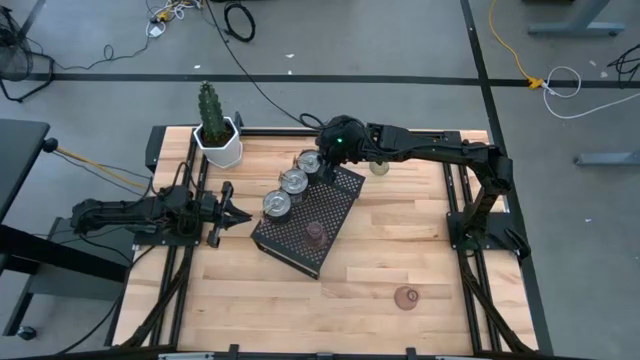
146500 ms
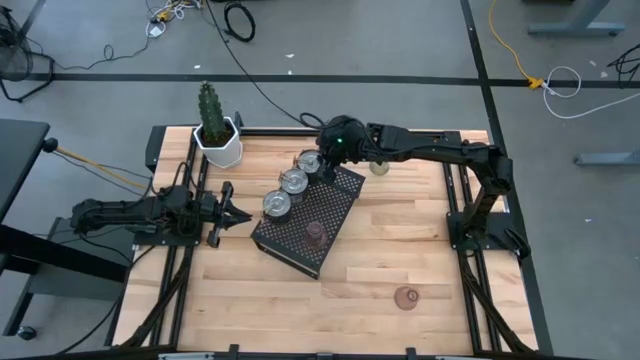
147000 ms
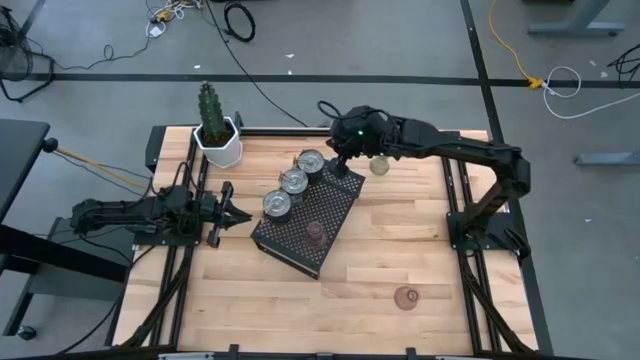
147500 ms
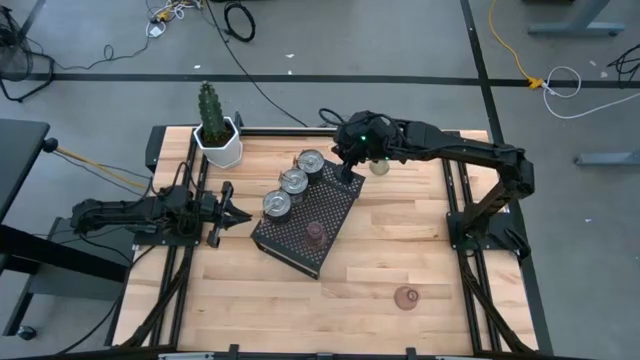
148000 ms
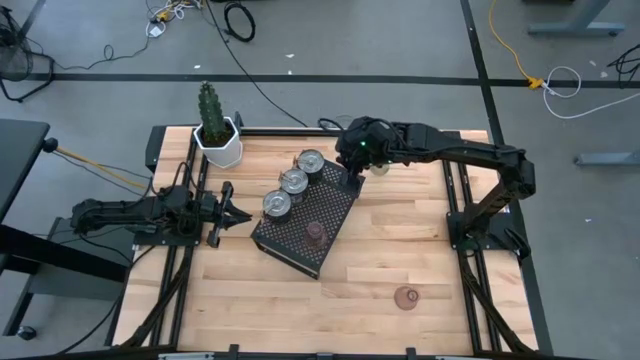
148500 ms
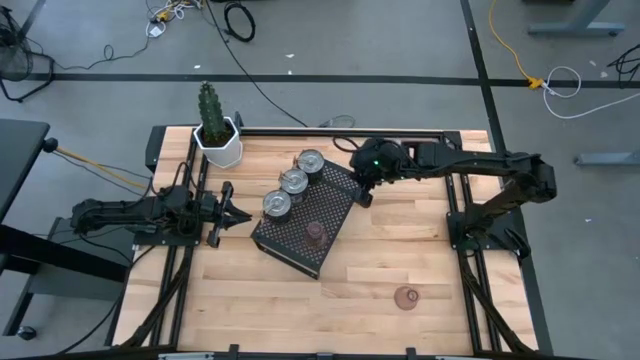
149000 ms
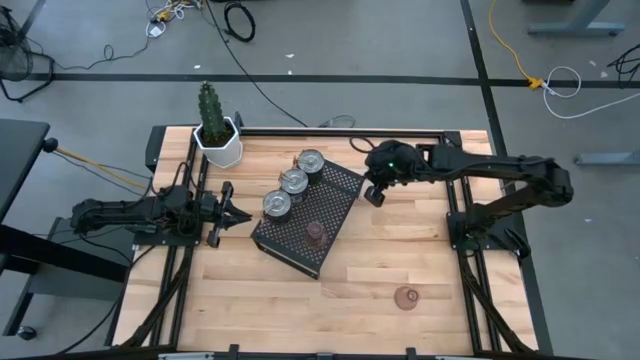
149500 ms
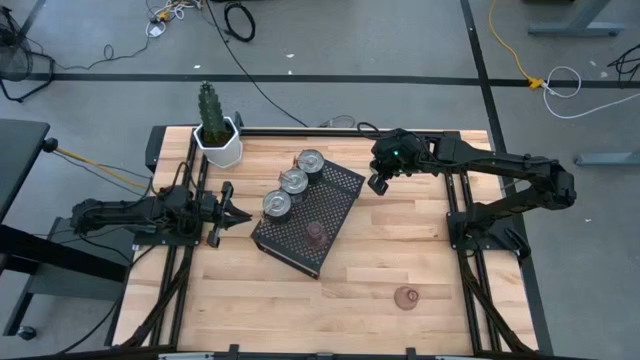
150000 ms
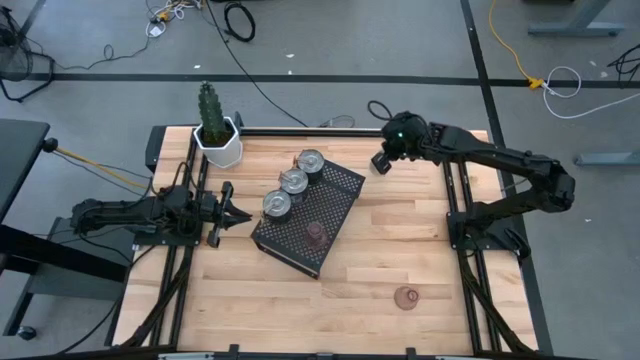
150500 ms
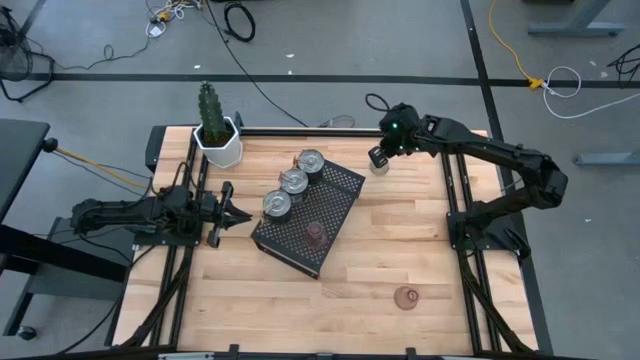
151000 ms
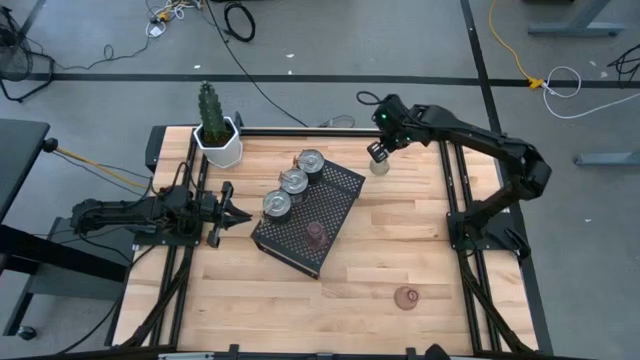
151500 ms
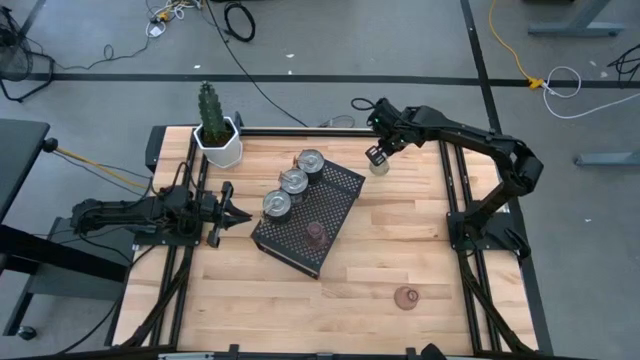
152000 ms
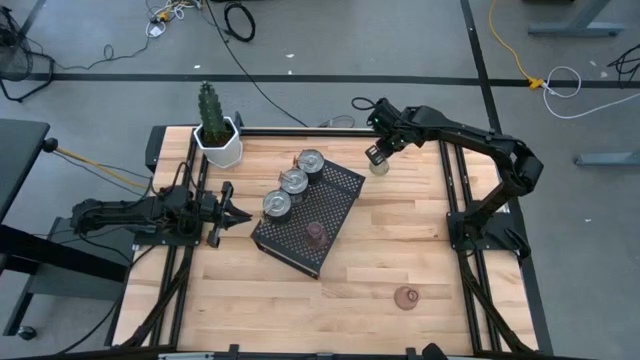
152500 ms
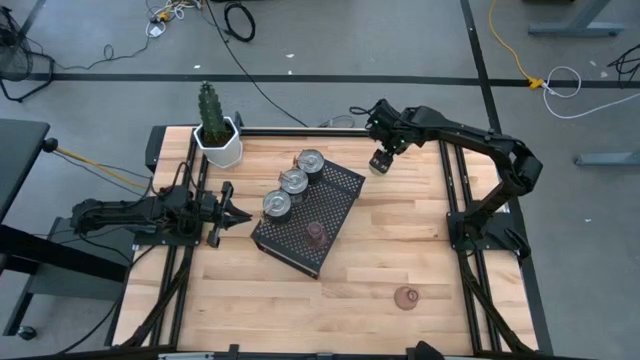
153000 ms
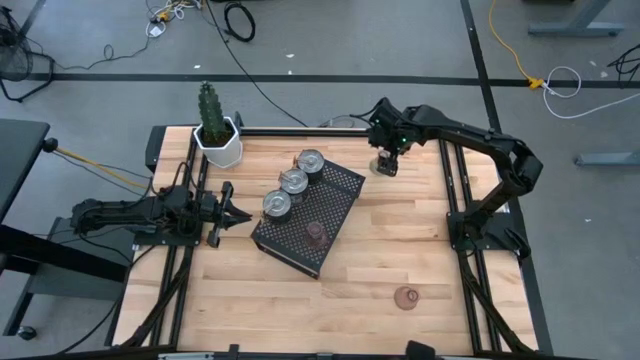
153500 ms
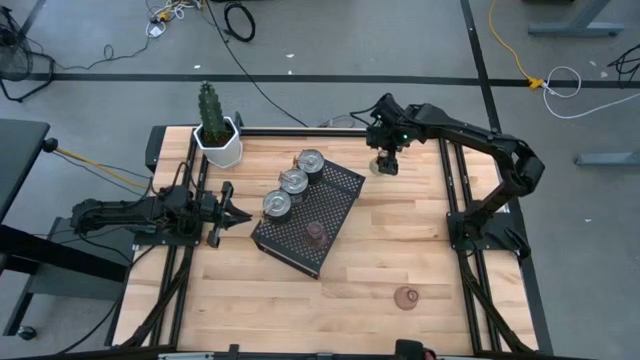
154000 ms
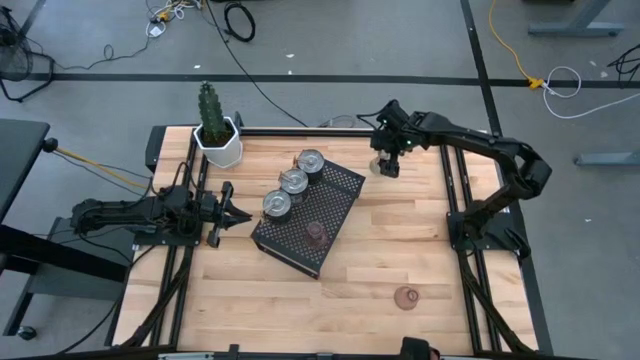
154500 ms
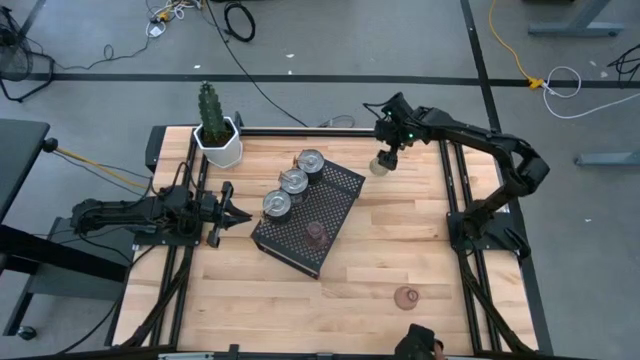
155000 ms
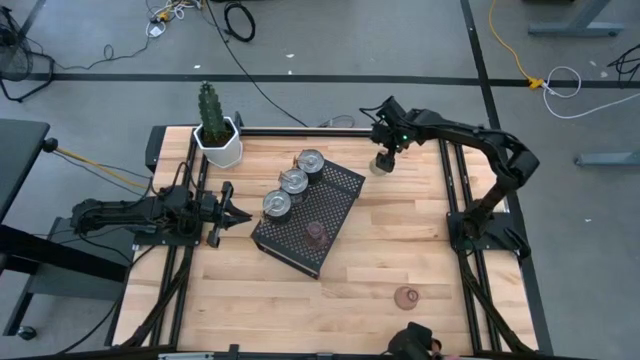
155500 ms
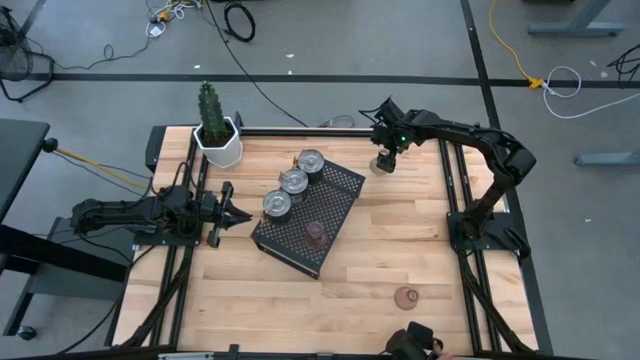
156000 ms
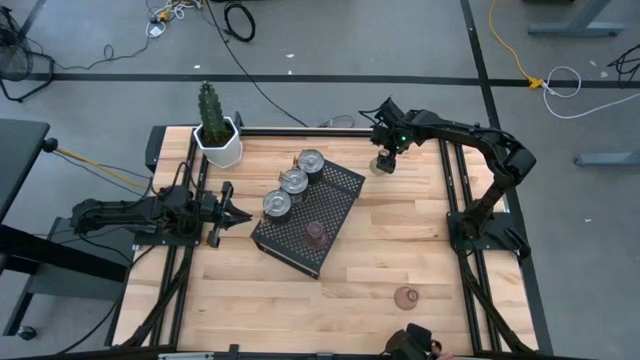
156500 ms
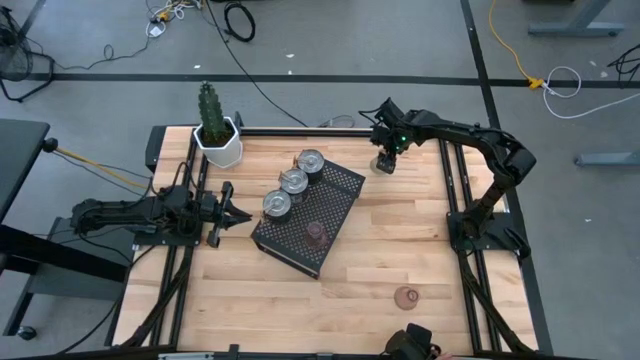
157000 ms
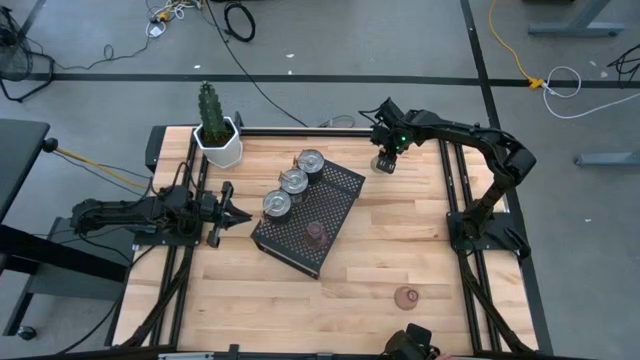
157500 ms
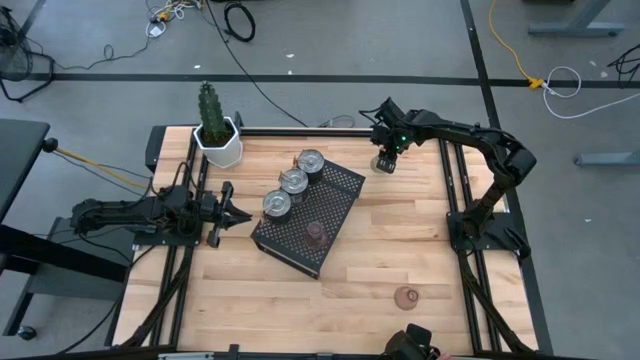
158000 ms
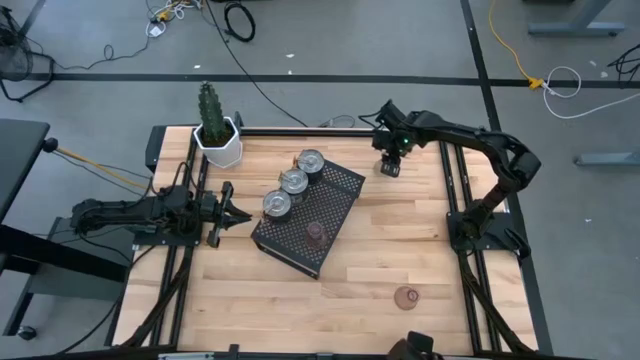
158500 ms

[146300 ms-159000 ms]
Task: Pick & Place candle stick holders
Put the green candle holder on the shelf

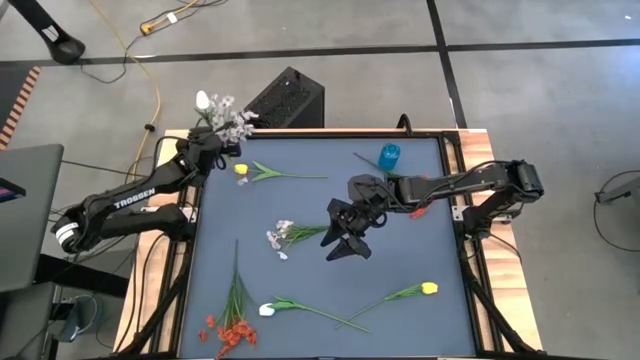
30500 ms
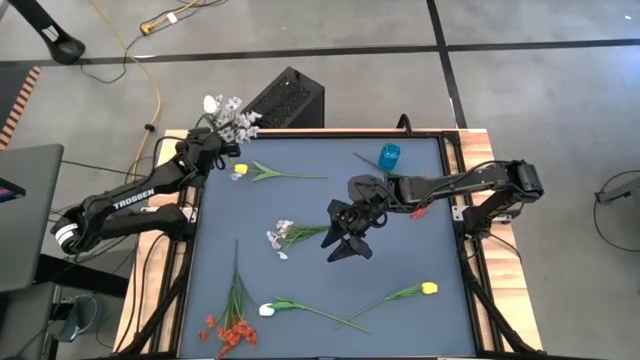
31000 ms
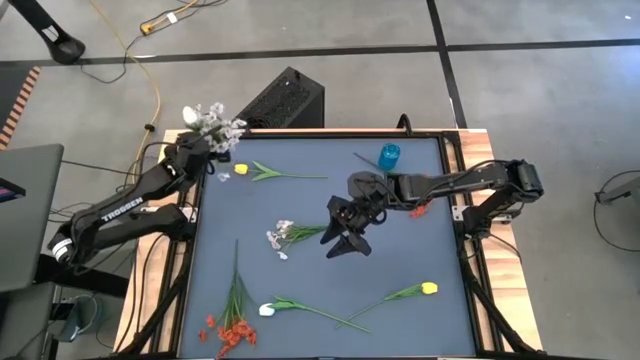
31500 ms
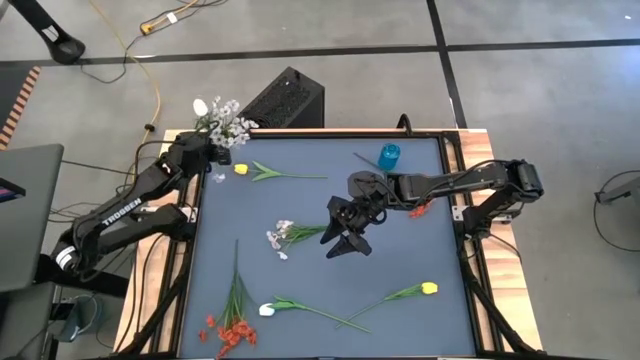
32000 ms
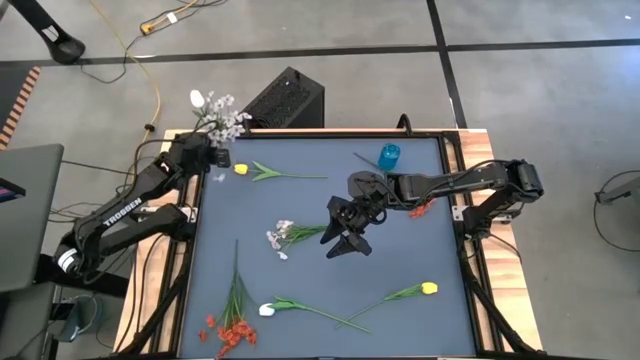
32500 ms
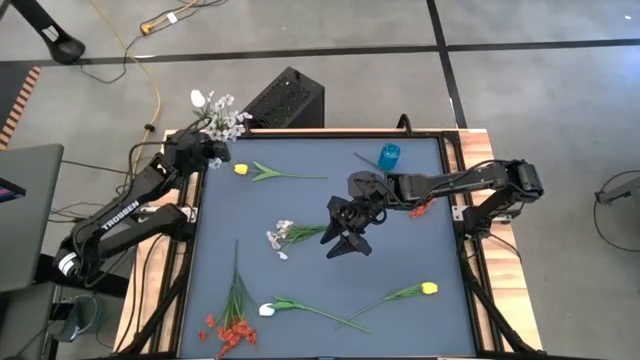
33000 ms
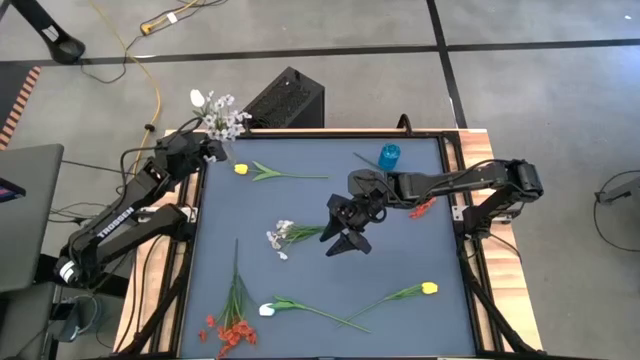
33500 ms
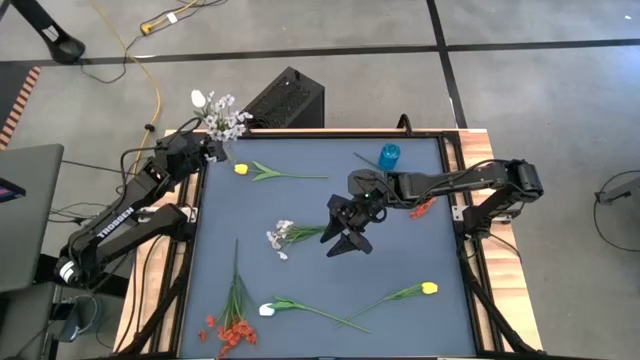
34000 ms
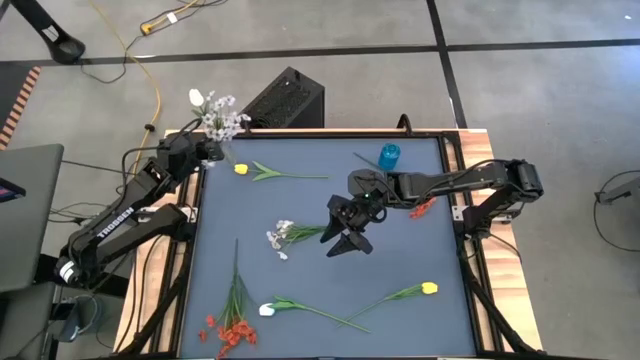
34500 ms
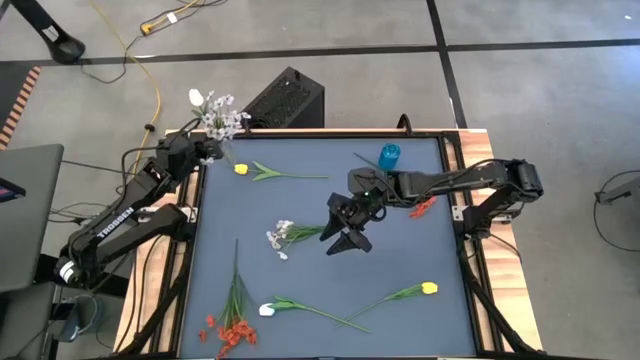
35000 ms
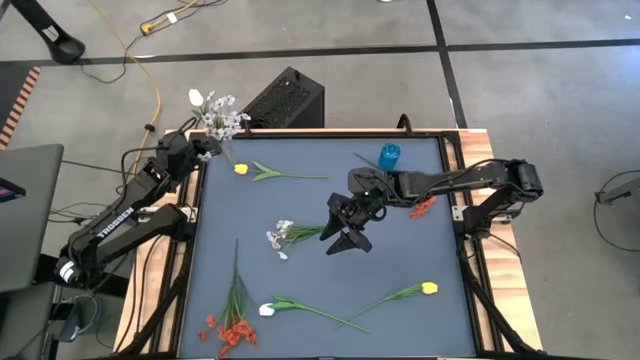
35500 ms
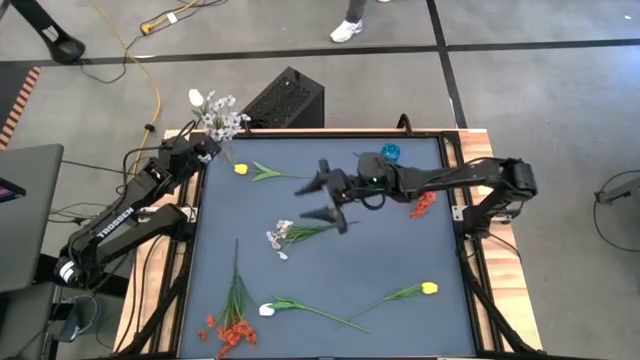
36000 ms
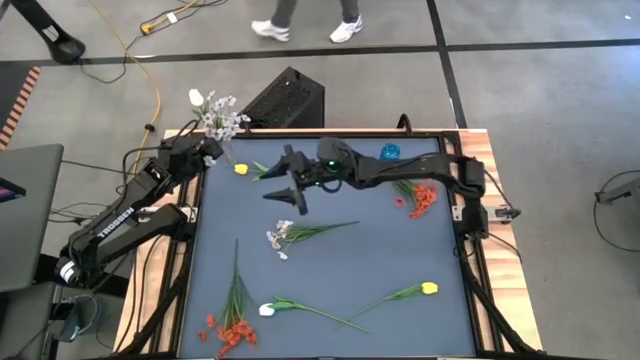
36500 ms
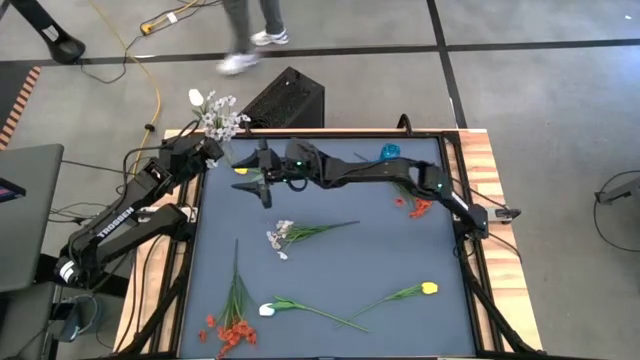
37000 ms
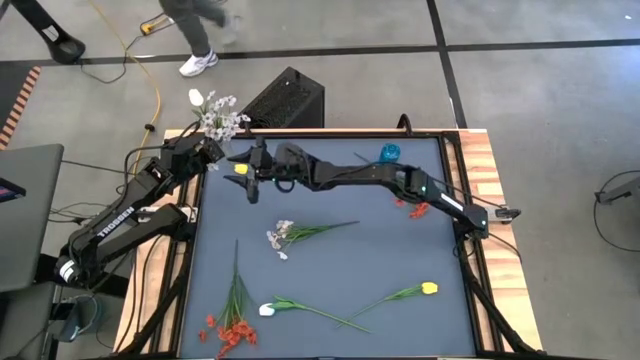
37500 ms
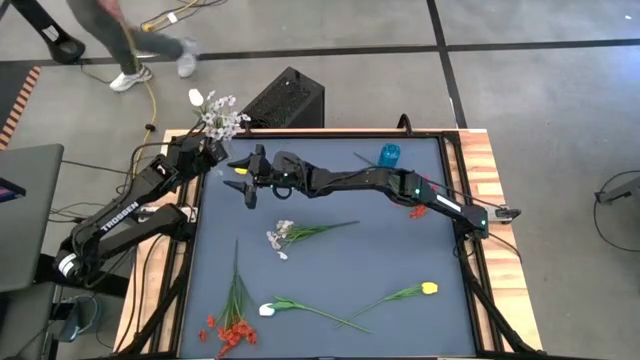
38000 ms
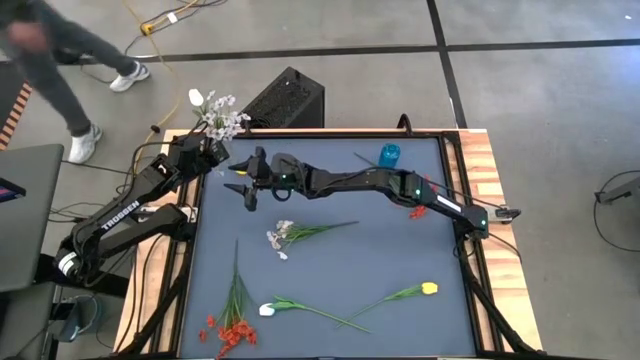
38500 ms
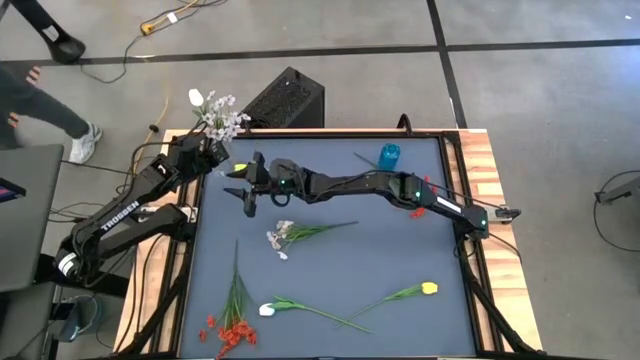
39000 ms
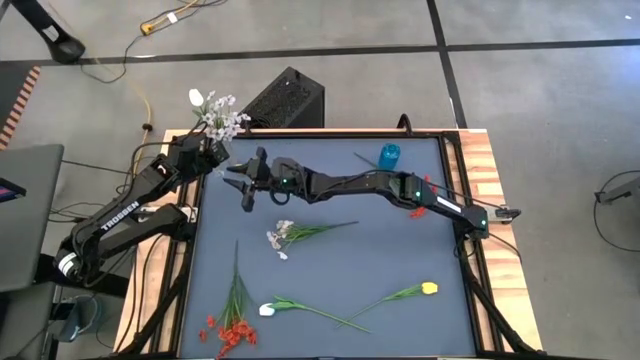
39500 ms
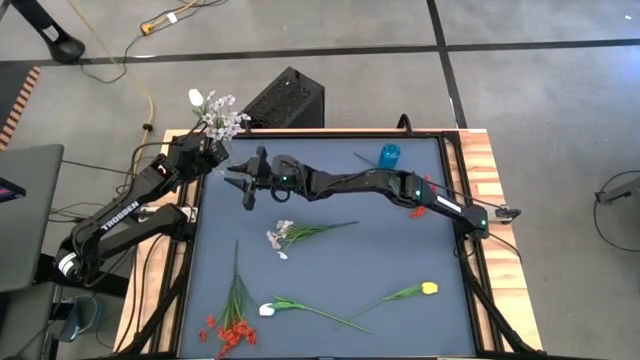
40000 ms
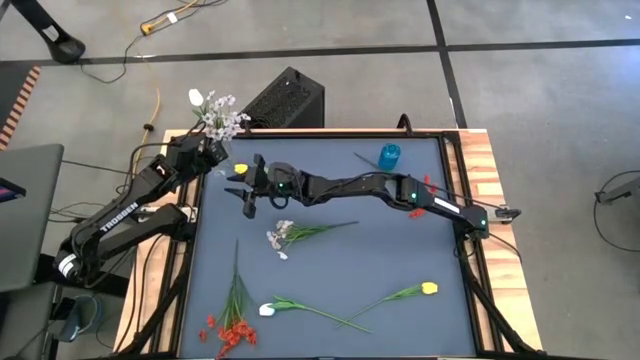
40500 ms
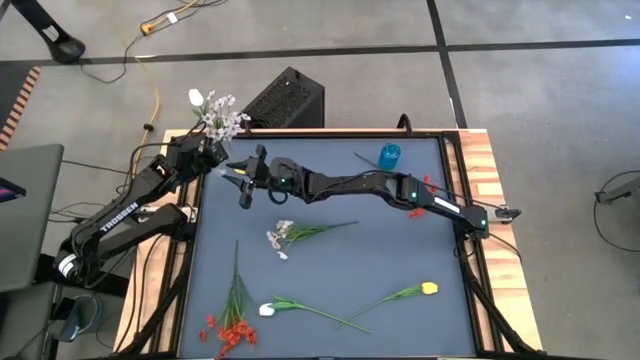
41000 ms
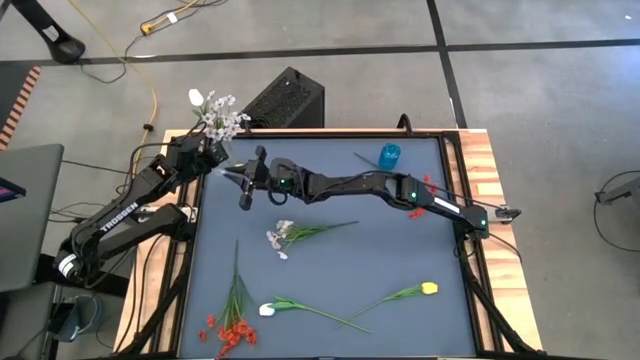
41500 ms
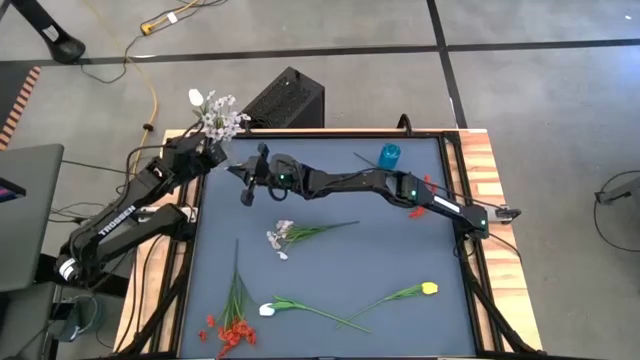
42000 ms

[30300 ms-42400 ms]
Task: Sort flowers into vase by color
Put the top white flower into the transparent vase
